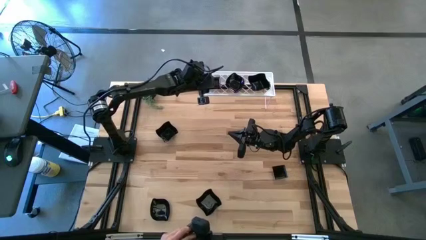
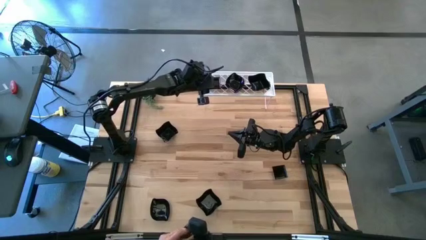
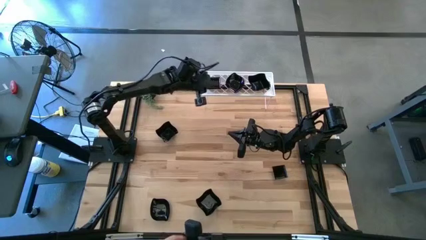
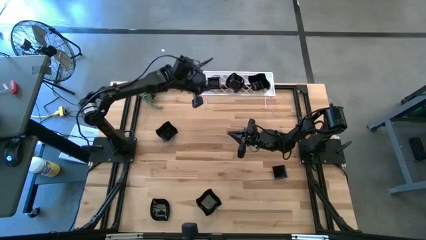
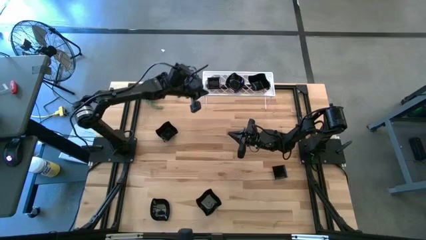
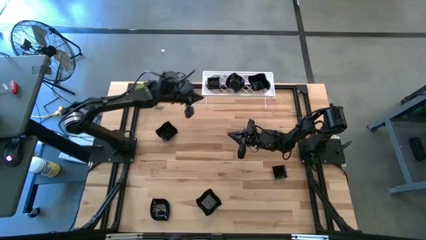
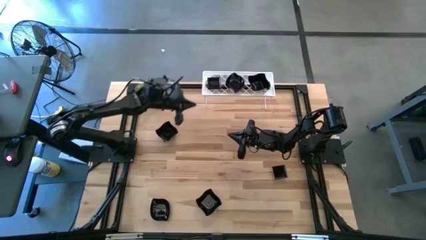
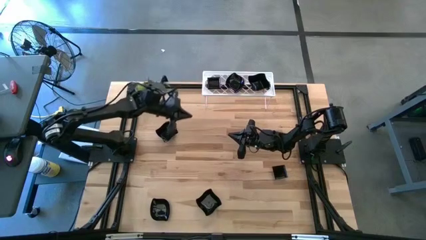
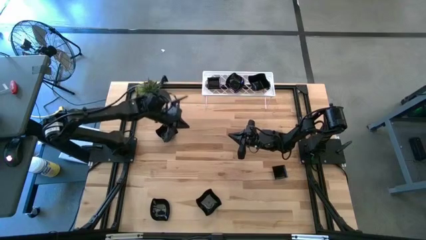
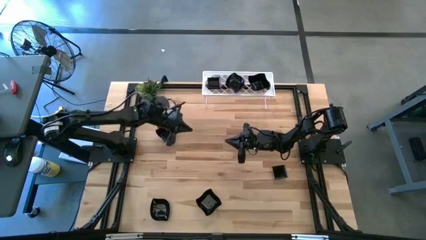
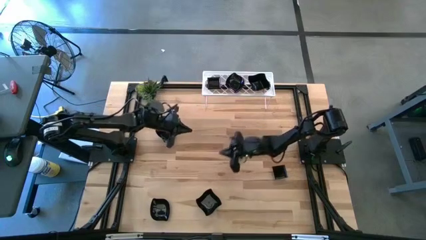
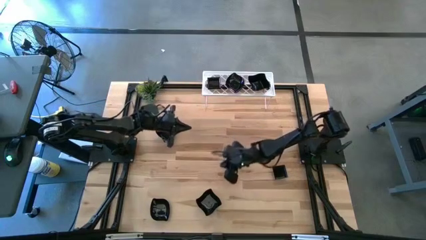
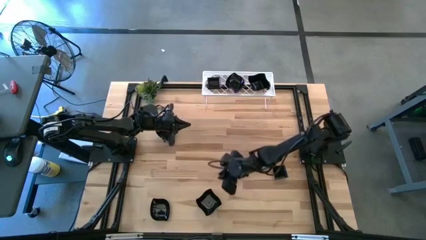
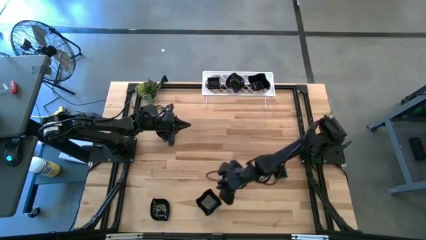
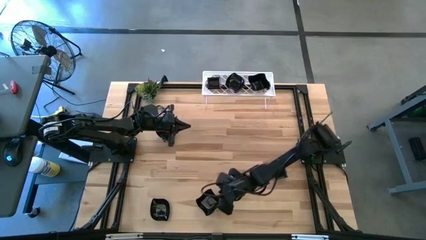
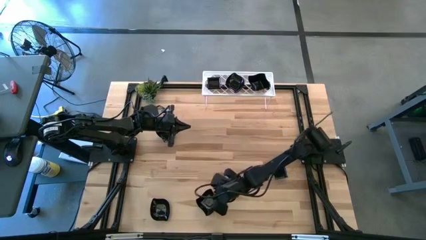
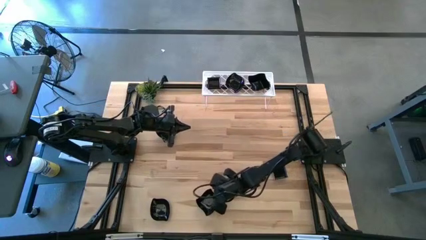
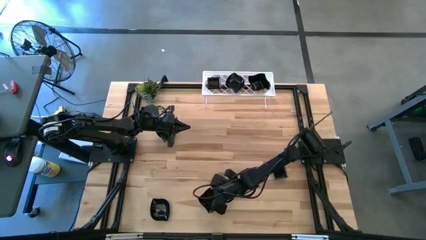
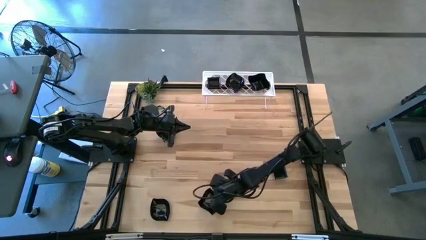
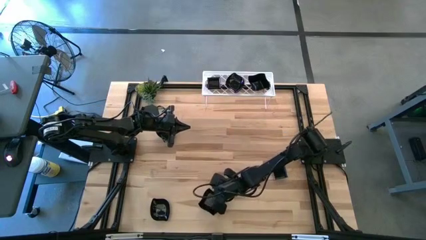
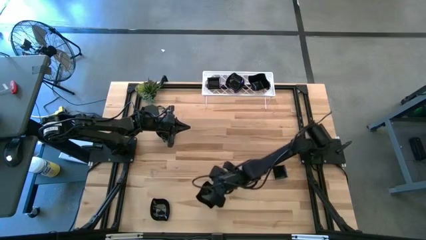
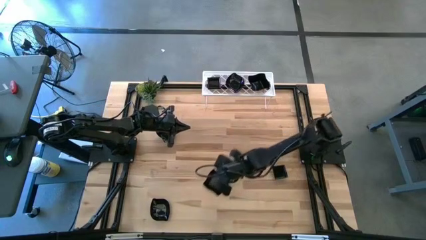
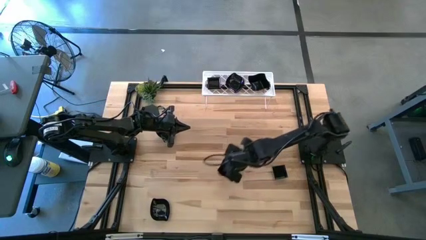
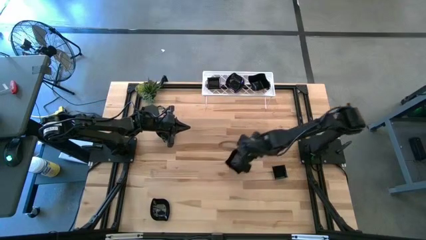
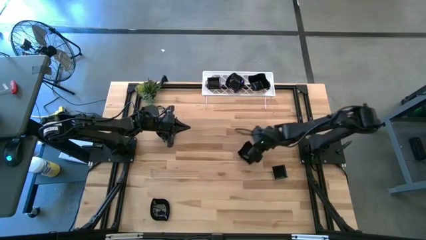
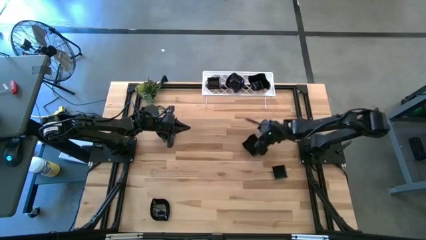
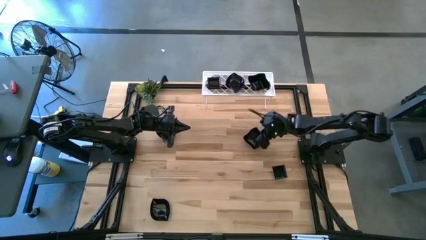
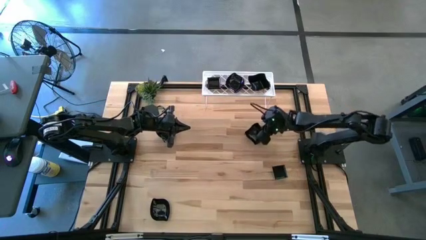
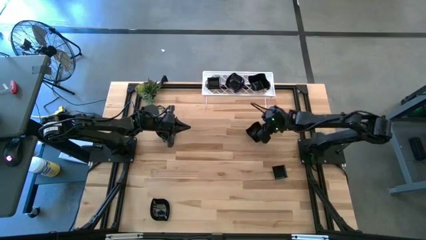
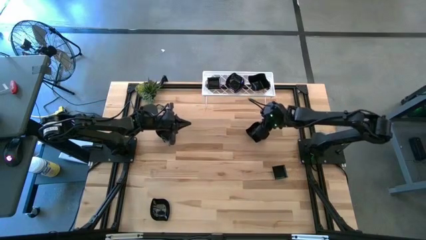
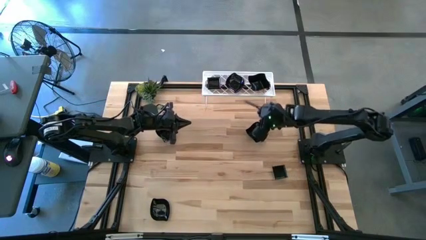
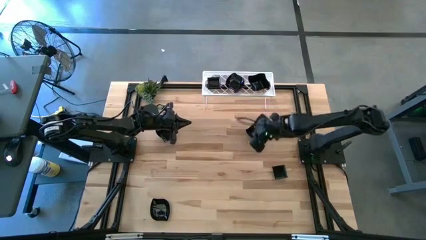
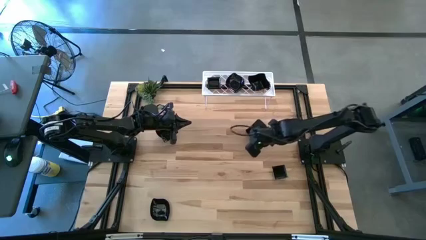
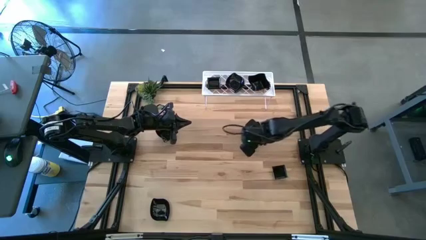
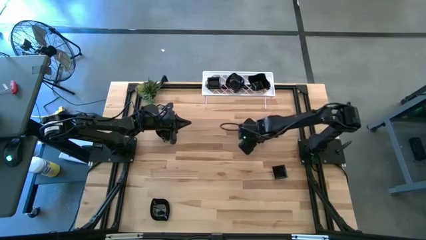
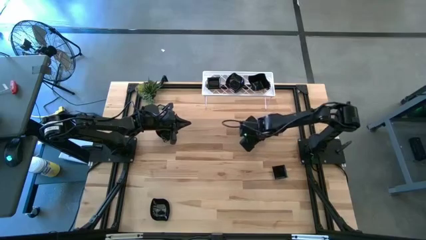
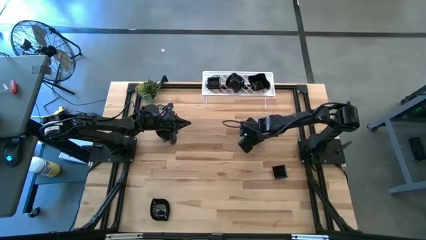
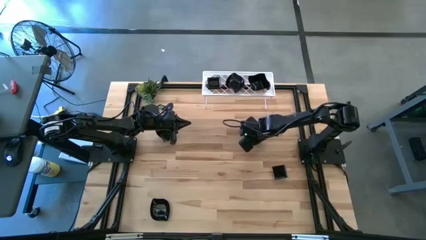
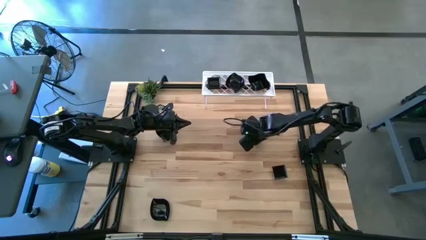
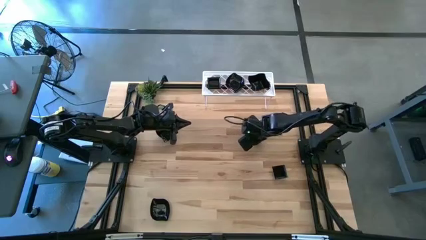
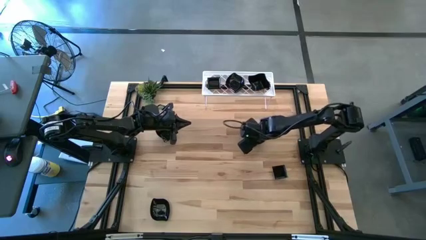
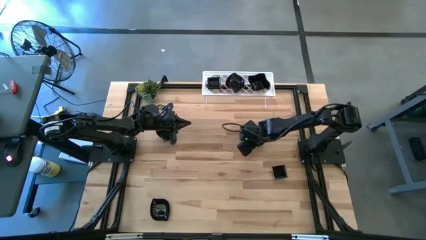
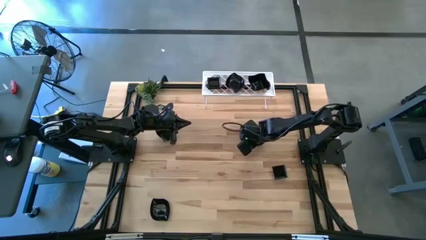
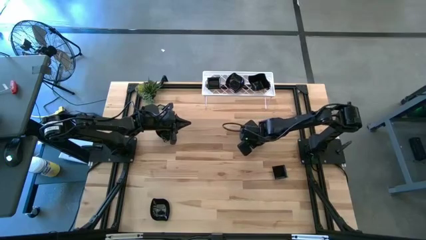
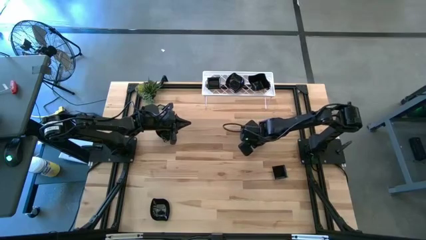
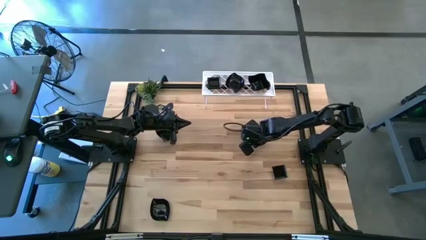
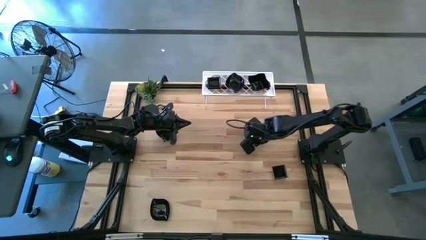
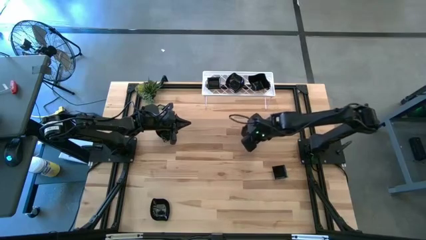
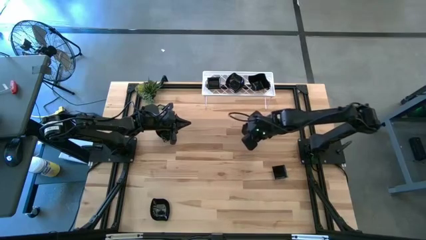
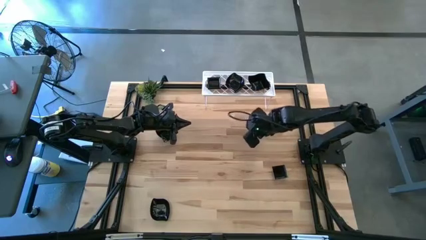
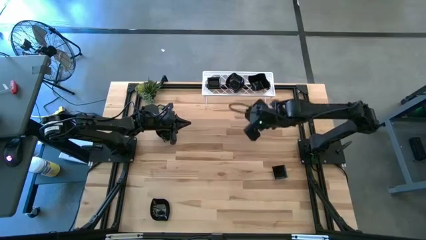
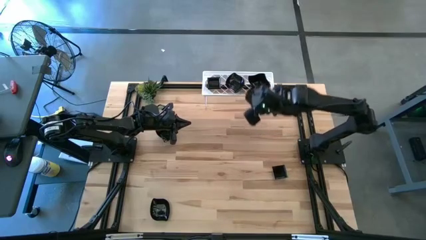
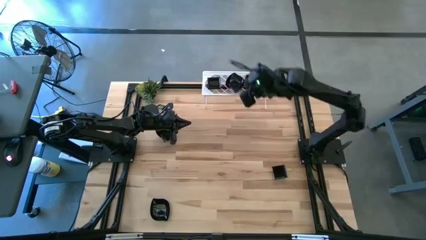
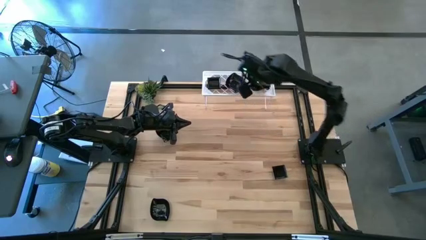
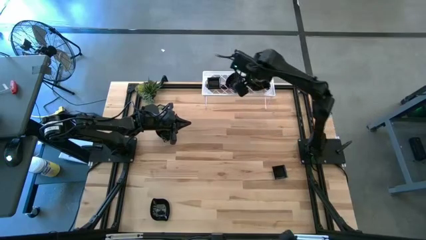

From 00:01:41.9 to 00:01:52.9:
Task: Pick & Place Mini shaped plates
Stack the distorted square plate on top of the stacked distorted square plates on the shelf
